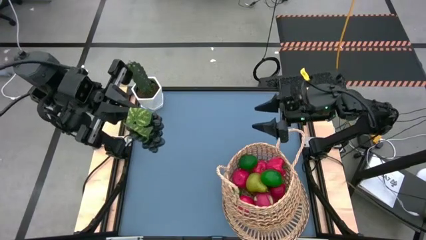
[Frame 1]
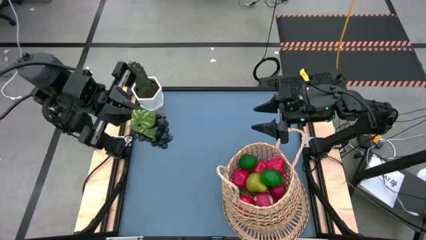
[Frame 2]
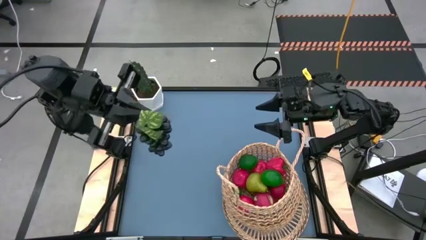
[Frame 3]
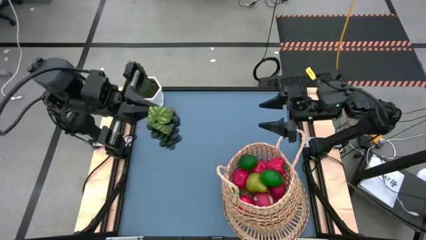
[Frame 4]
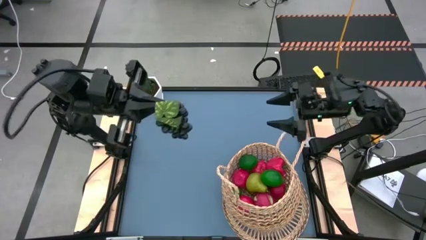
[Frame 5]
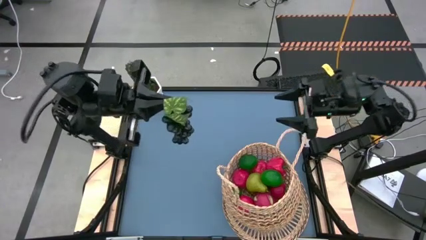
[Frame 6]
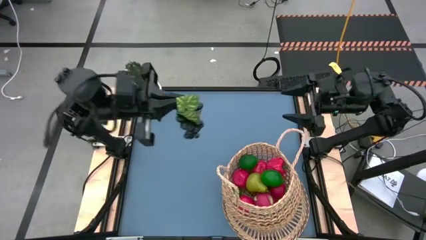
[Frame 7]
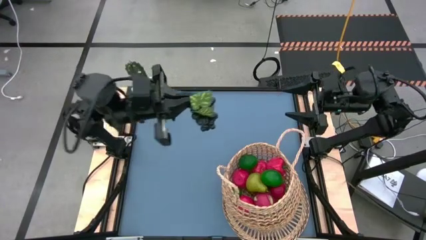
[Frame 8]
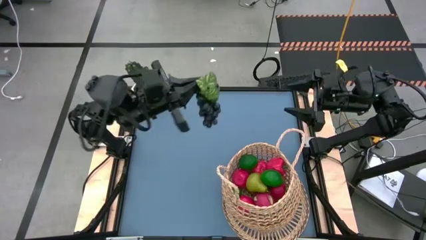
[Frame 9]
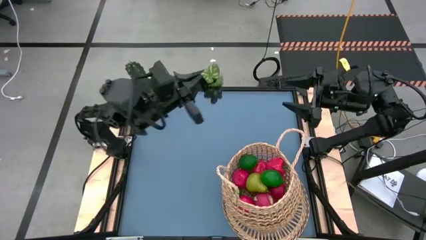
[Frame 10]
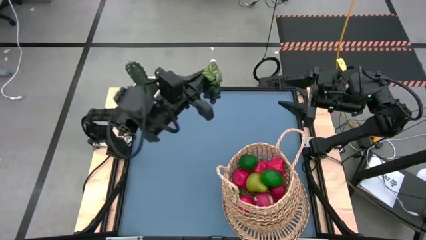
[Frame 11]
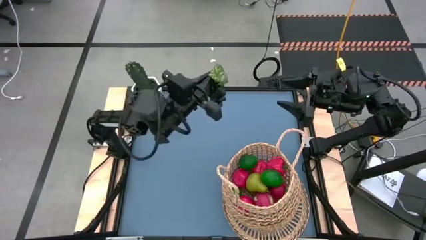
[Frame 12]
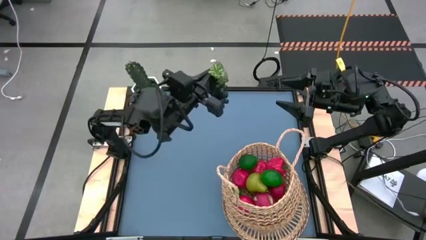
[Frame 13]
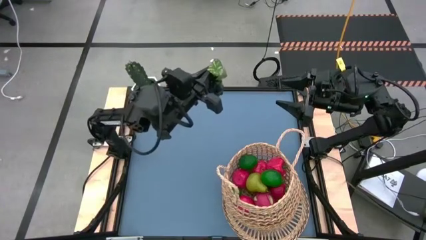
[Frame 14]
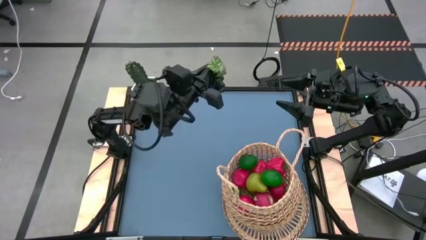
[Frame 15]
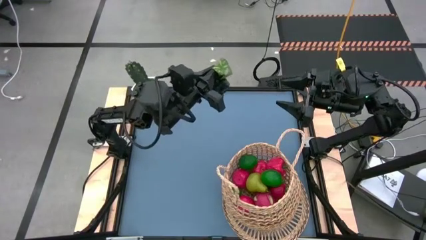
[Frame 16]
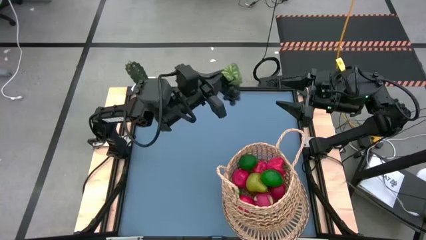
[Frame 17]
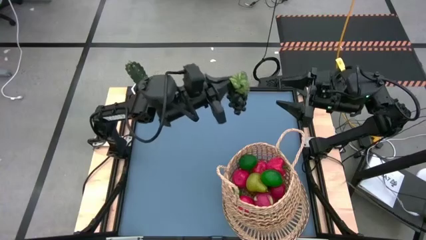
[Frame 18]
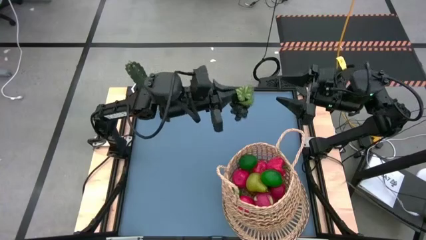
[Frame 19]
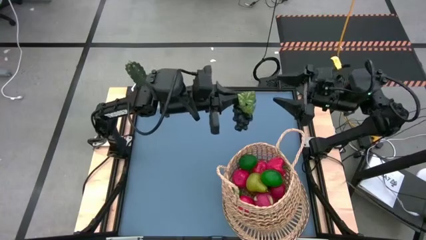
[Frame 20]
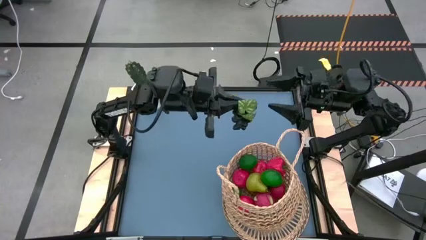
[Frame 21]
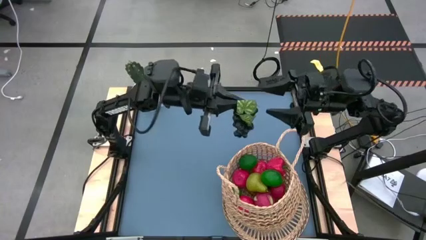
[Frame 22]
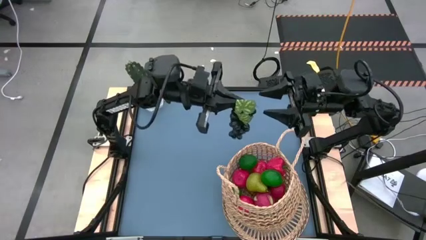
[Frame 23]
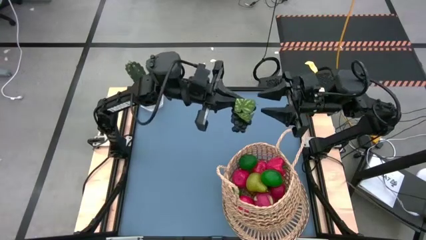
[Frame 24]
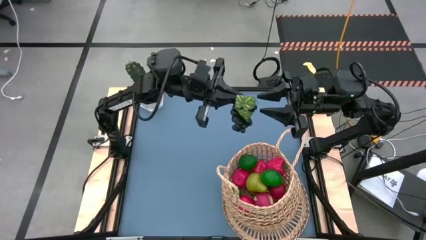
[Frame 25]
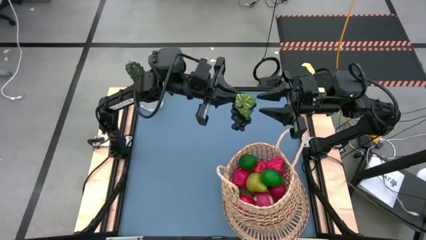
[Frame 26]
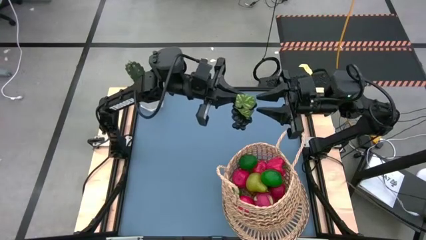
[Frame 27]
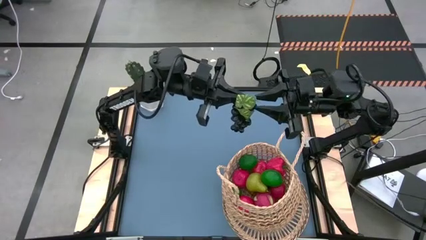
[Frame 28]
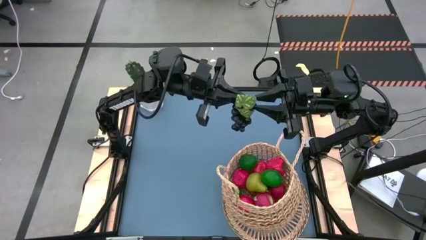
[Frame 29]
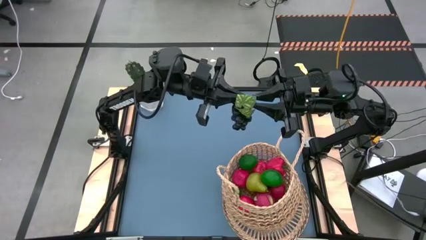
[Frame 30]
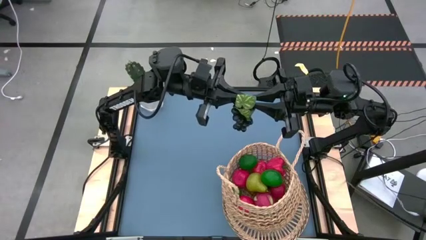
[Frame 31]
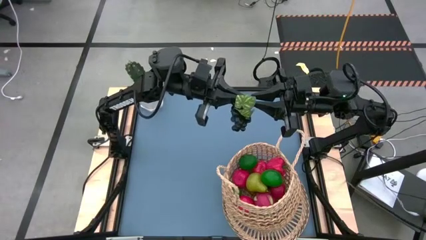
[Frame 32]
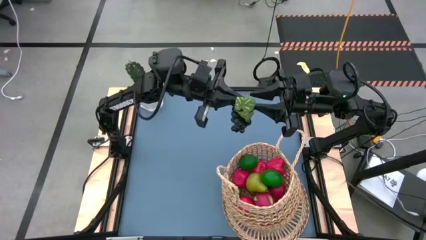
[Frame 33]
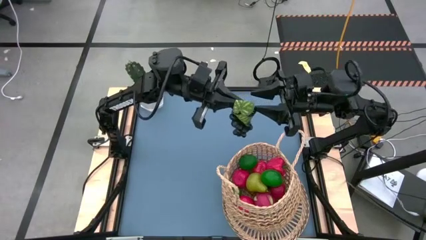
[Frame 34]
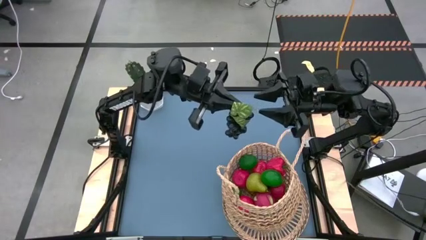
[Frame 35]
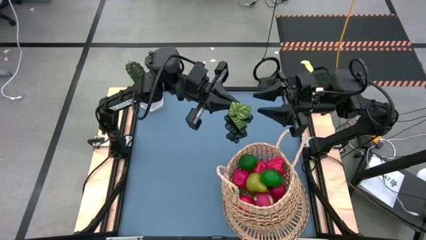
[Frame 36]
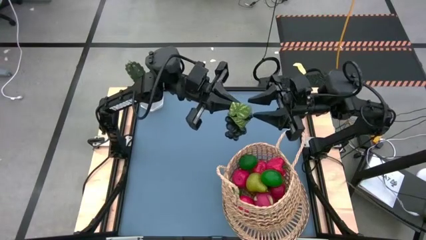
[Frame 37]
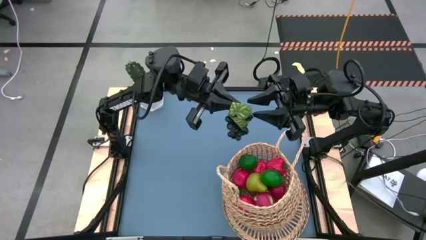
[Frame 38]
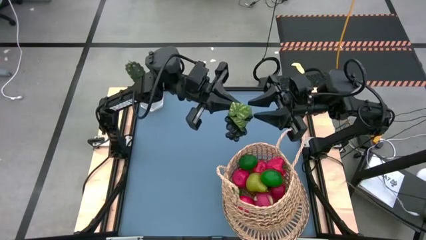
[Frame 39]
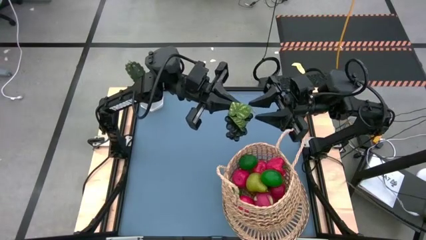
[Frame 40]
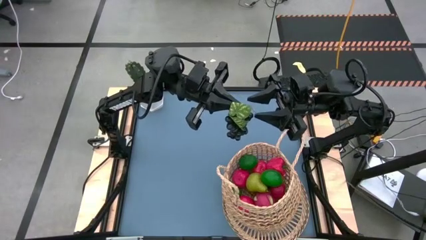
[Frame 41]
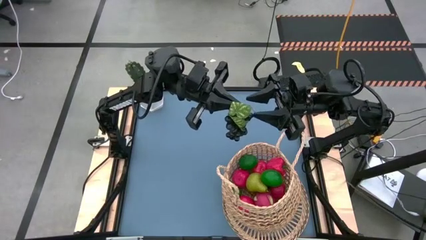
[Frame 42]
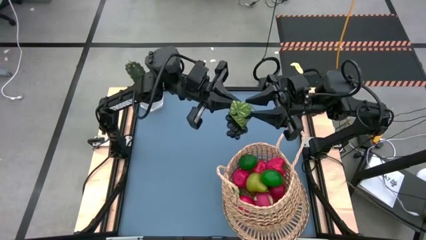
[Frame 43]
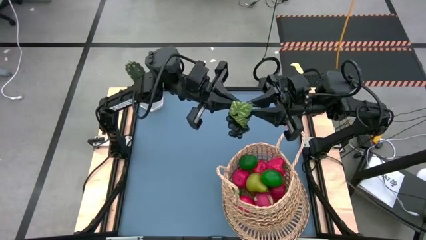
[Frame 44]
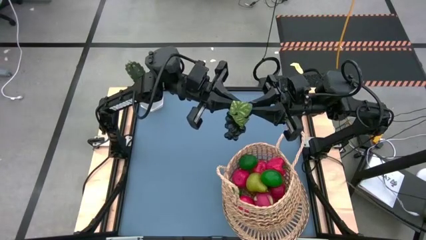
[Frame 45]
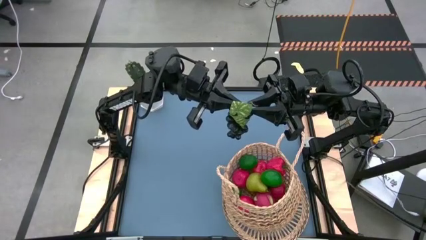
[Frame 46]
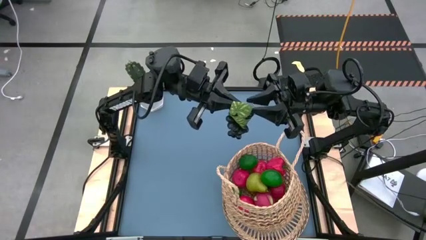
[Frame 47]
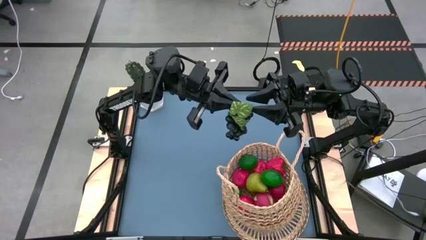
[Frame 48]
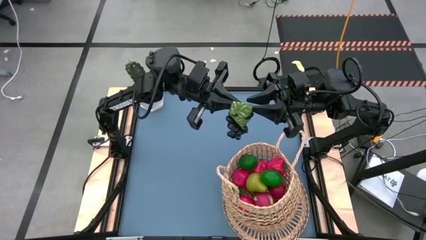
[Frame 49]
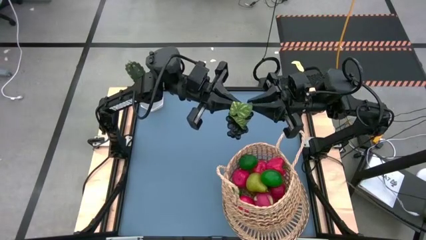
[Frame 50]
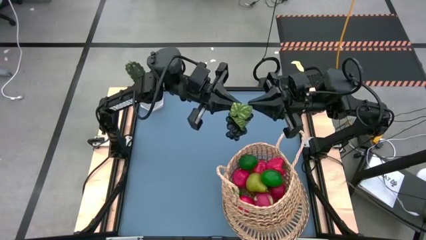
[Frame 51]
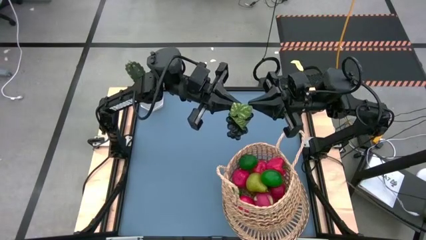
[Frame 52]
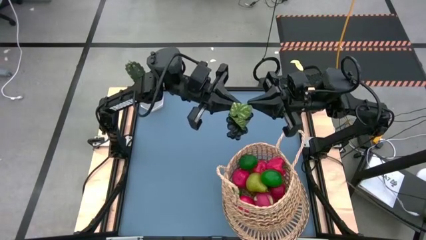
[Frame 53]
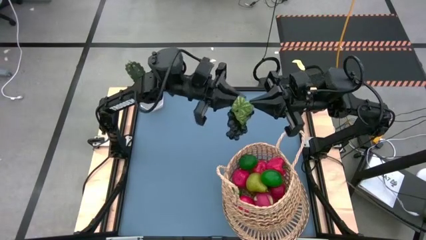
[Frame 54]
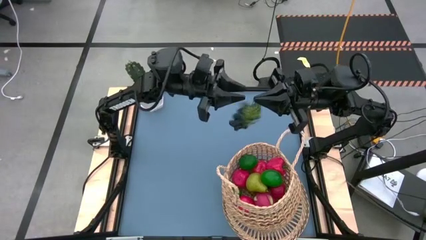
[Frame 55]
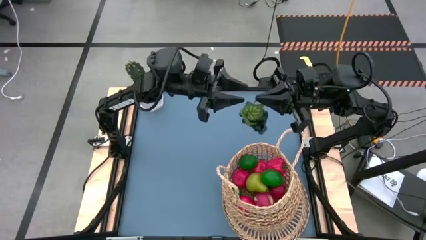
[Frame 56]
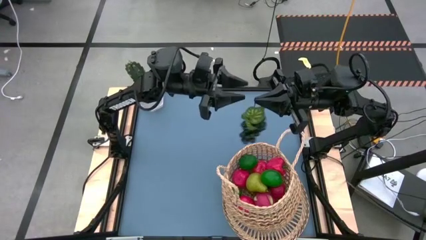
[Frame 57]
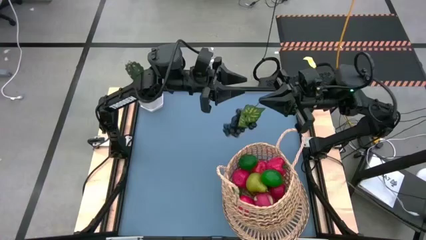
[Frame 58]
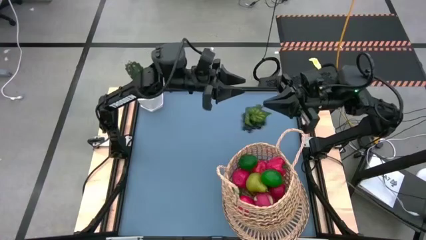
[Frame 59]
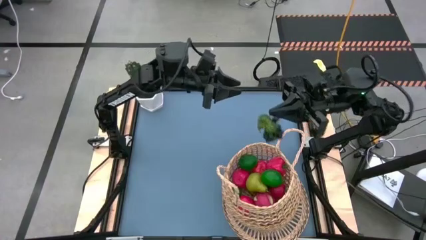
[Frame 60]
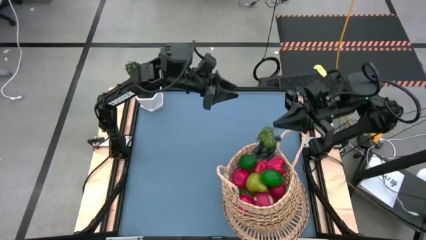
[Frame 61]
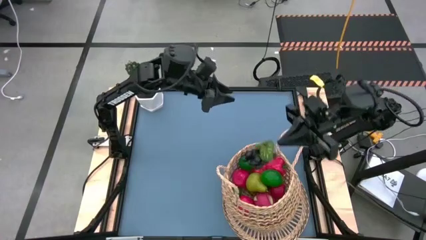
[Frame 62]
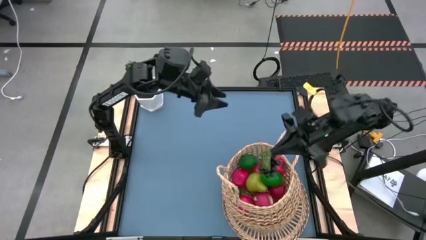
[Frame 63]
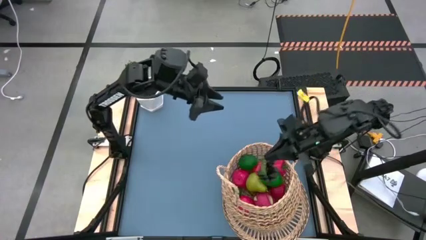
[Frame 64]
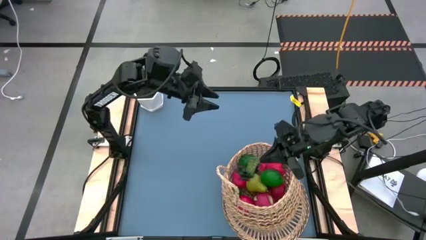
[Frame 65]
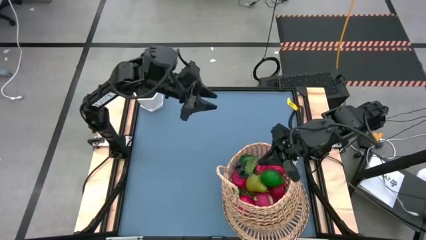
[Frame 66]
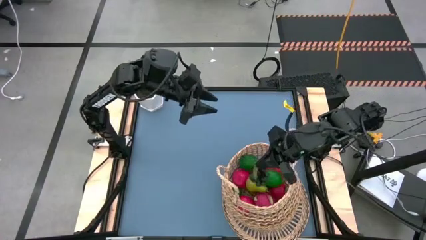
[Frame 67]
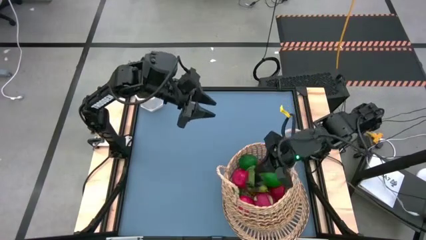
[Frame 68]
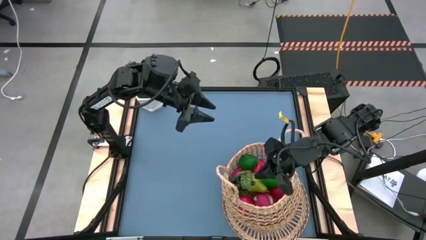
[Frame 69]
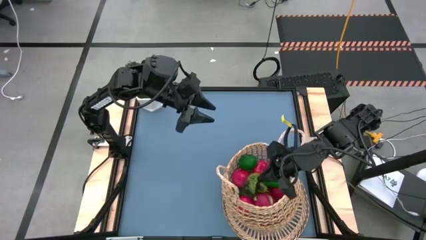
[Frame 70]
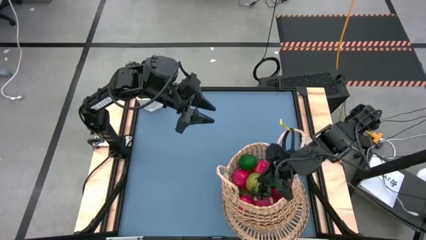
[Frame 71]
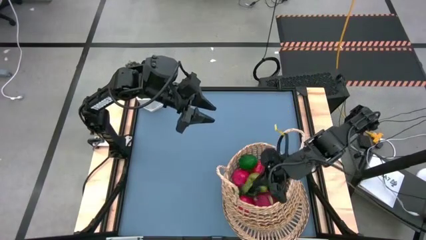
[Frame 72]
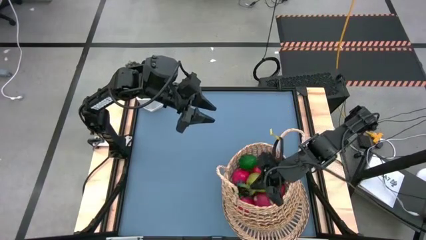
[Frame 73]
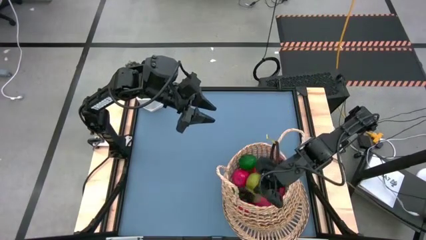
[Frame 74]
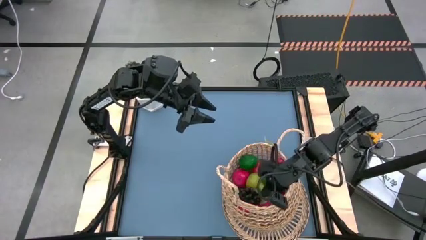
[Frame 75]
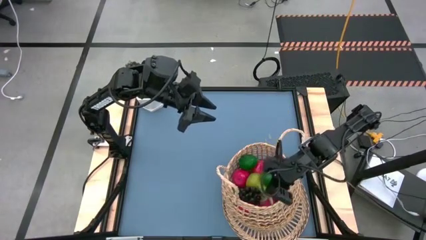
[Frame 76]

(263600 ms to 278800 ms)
Task: Build produce basket
Put the purple grapes into the brown basket

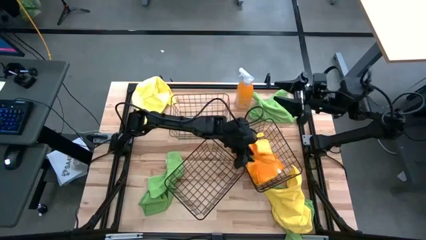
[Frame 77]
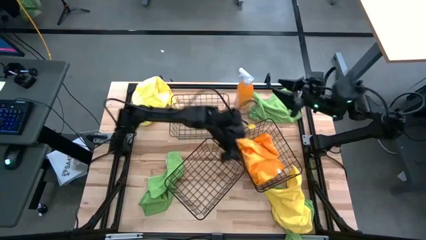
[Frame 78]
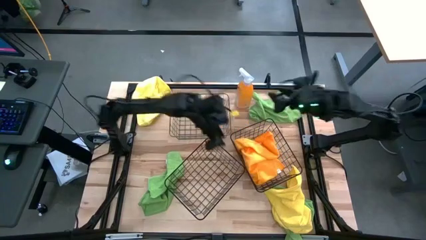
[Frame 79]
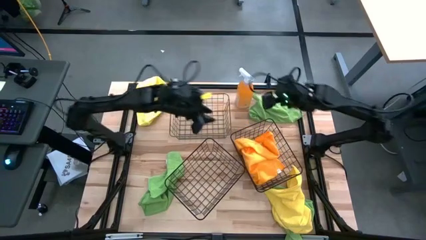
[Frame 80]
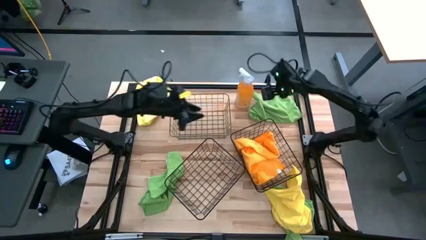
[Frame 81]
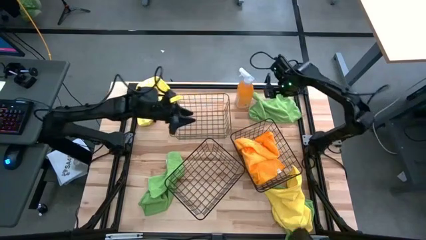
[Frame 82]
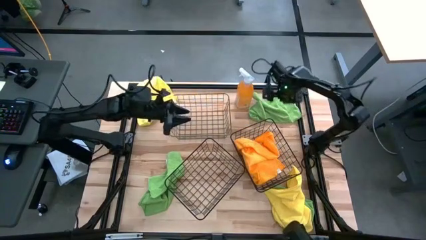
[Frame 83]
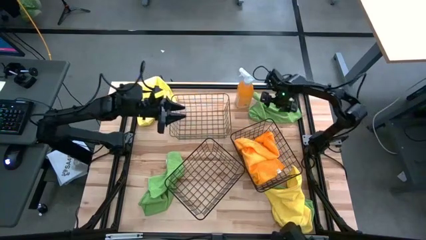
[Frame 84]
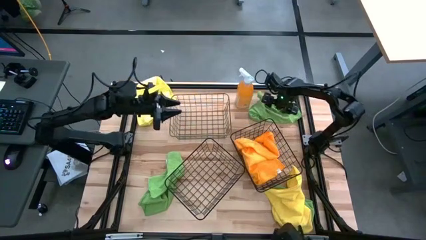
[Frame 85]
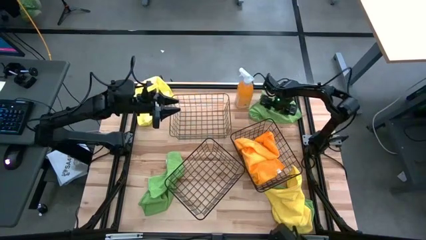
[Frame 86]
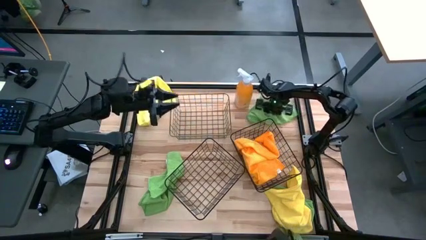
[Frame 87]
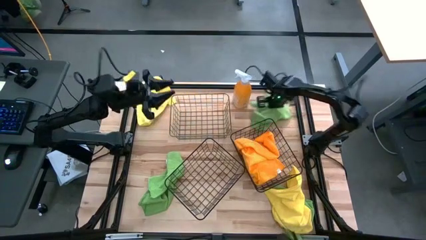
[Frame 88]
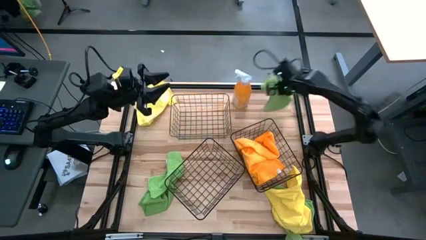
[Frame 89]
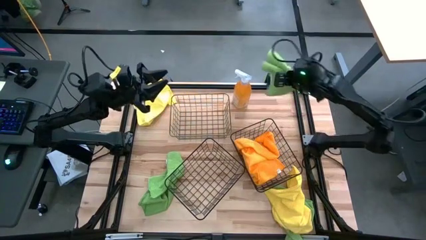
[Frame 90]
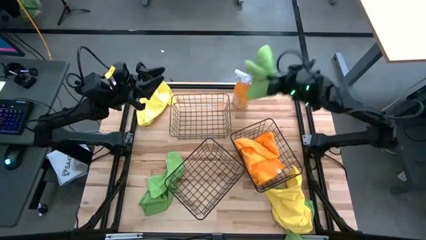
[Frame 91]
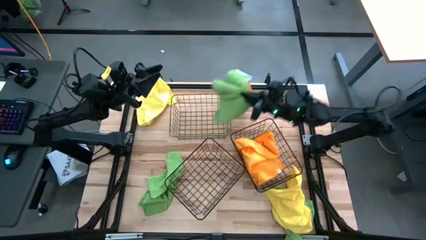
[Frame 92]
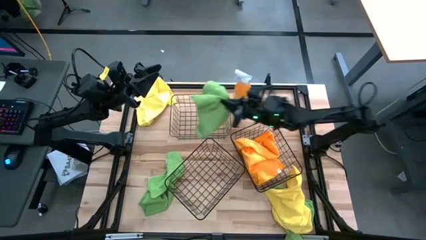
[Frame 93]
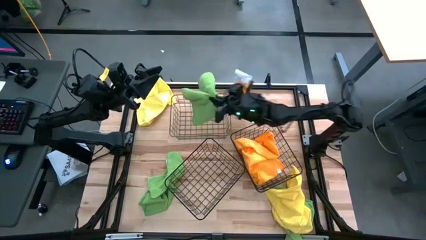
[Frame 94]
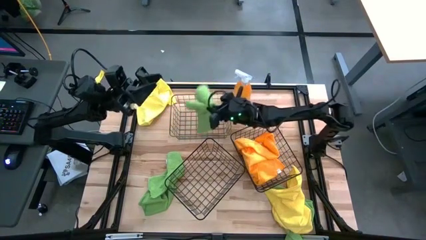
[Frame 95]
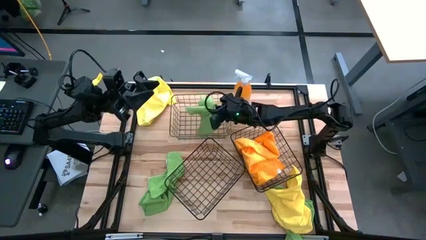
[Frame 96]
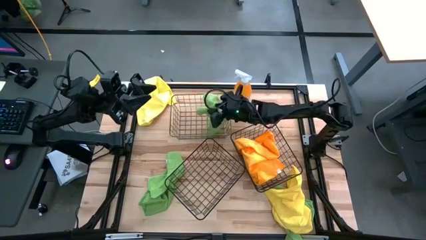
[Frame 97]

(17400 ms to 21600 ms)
Task: Sort microfiber towel by color & place in baskets
Put the top green microfiber cloth into the top wire basket
